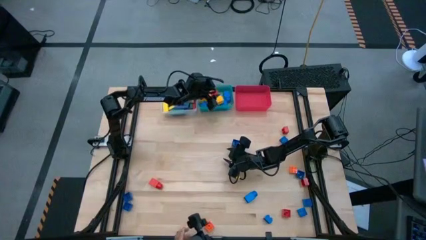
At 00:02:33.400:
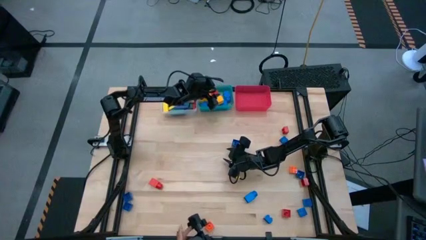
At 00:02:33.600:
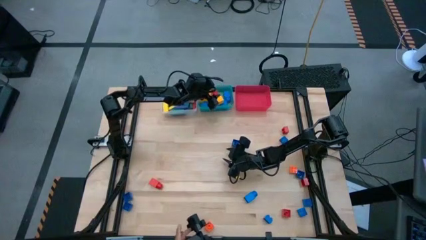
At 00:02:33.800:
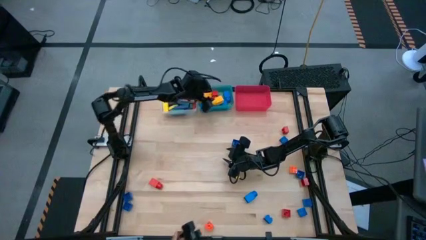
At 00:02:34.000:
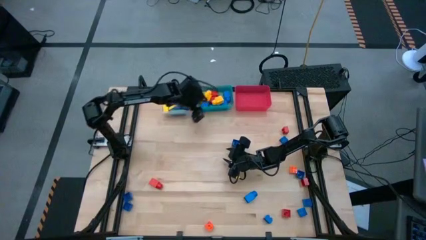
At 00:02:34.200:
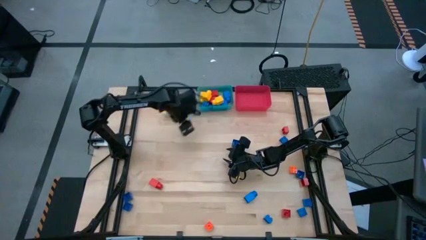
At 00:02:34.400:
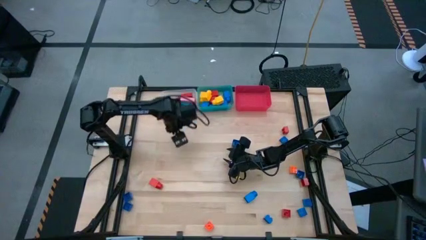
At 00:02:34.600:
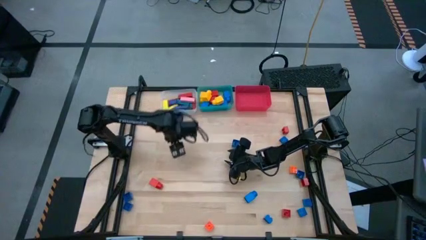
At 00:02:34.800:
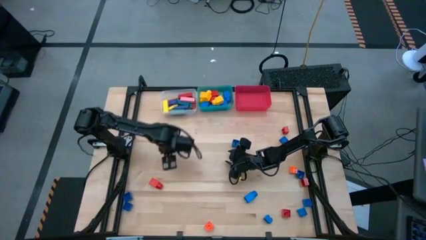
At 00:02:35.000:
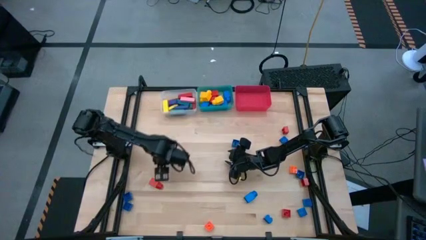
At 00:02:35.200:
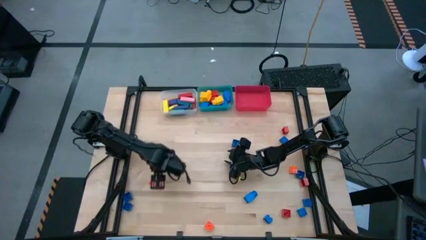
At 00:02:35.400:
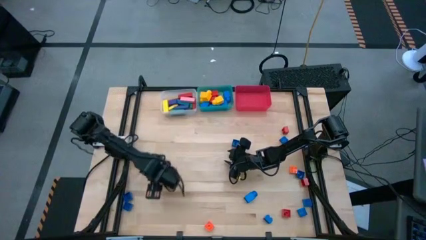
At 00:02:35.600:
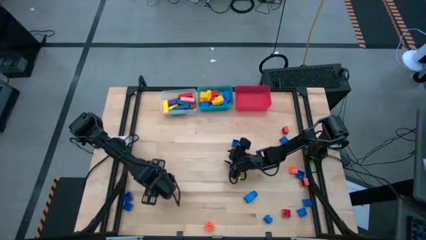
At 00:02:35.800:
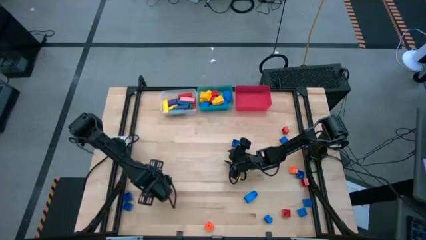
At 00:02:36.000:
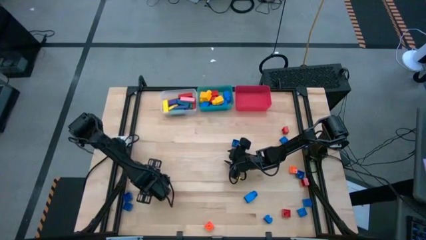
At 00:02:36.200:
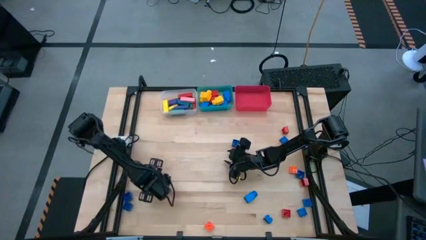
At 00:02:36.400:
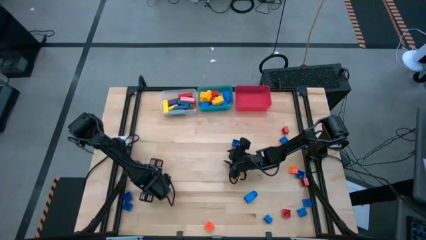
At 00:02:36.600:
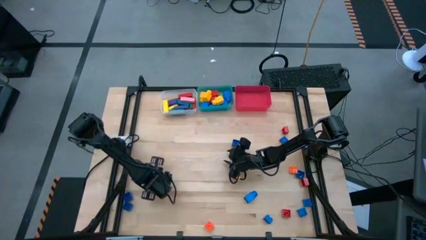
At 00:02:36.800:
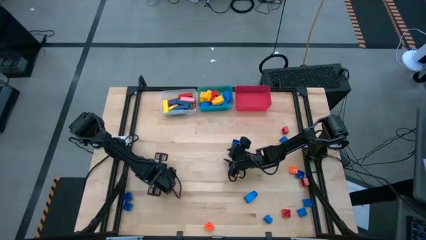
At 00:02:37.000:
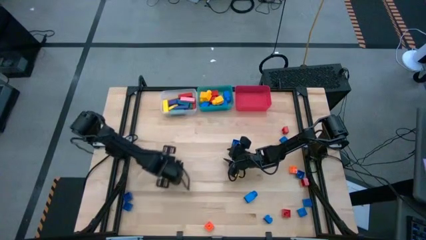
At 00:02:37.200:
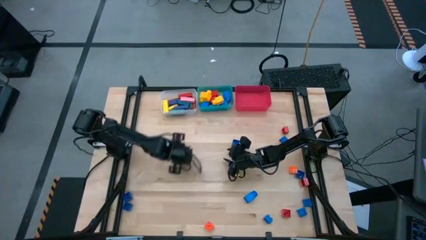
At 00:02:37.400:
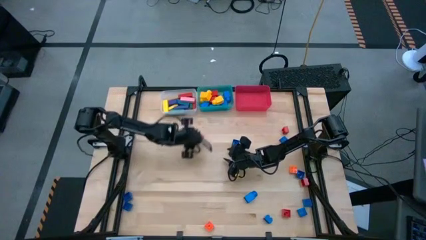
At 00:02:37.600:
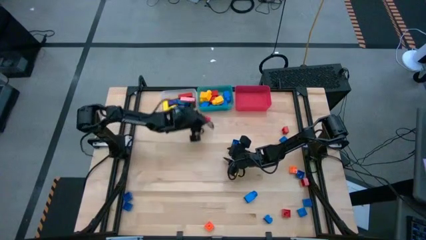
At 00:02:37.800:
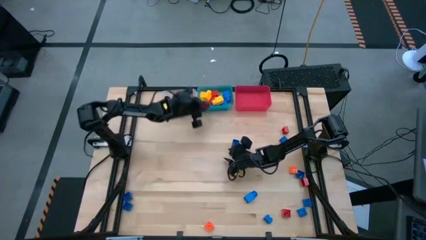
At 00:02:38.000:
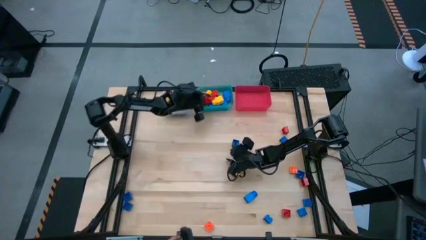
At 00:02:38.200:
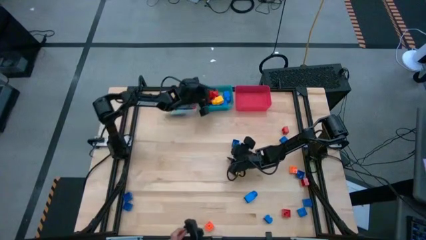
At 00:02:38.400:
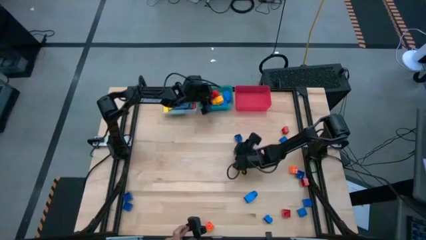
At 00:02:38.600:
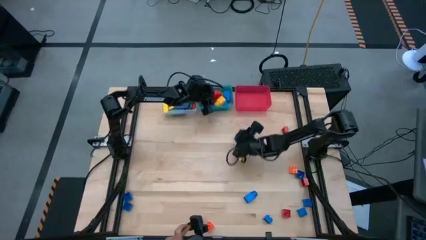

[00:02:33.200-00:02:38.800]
Task: Sort blocks by size
Put the red 1 stud game piece into the green bin

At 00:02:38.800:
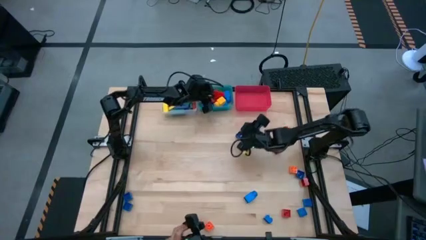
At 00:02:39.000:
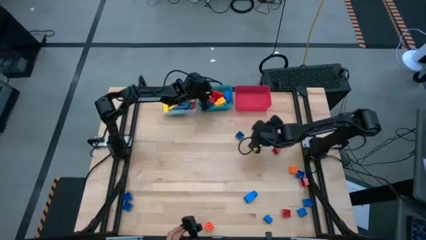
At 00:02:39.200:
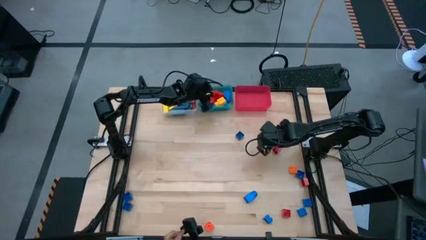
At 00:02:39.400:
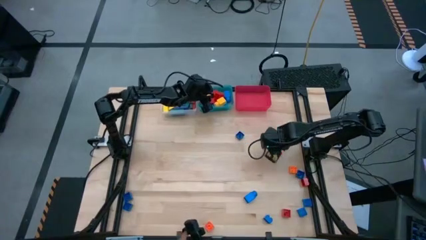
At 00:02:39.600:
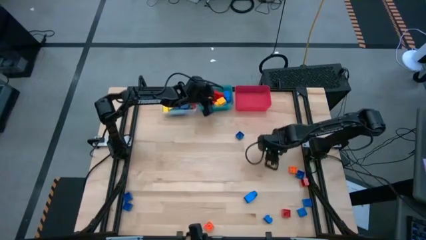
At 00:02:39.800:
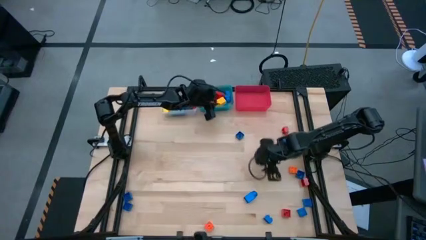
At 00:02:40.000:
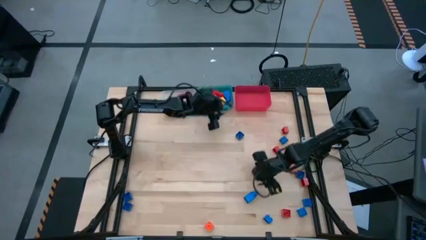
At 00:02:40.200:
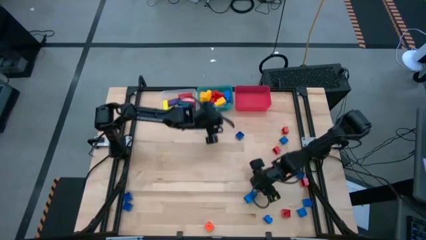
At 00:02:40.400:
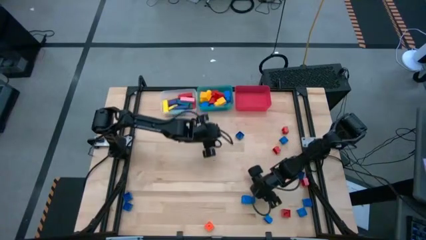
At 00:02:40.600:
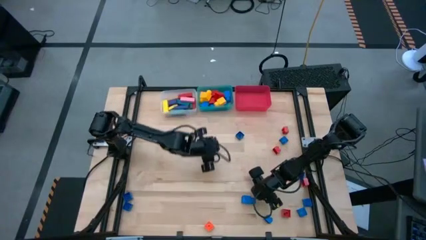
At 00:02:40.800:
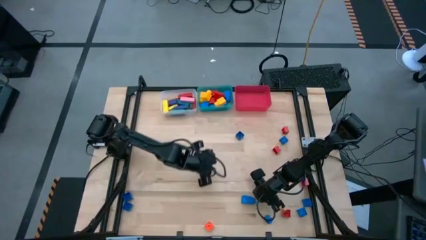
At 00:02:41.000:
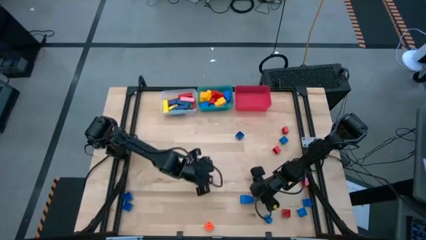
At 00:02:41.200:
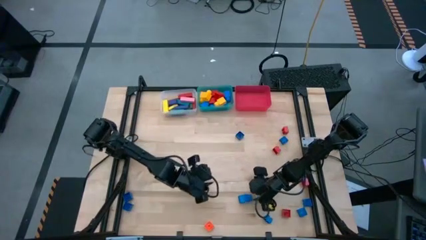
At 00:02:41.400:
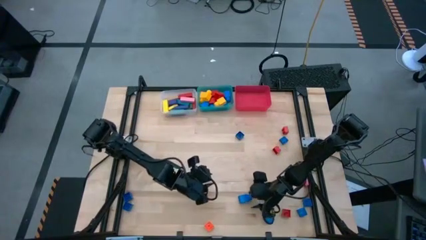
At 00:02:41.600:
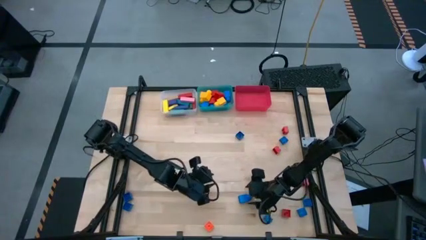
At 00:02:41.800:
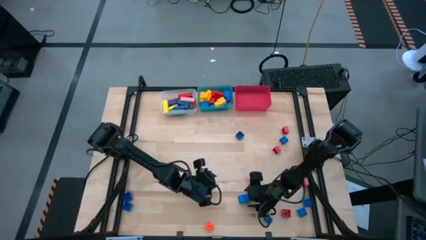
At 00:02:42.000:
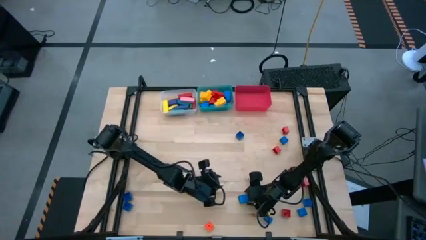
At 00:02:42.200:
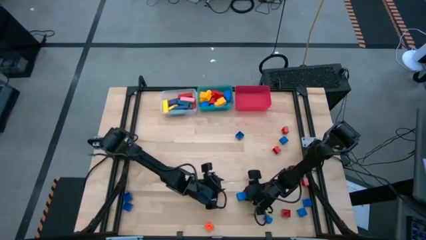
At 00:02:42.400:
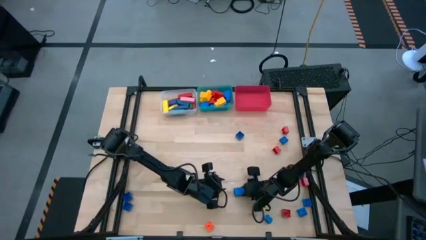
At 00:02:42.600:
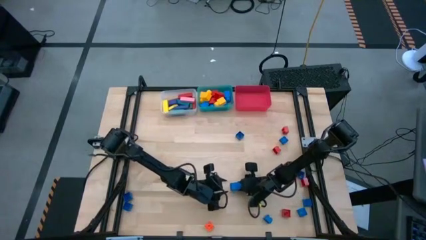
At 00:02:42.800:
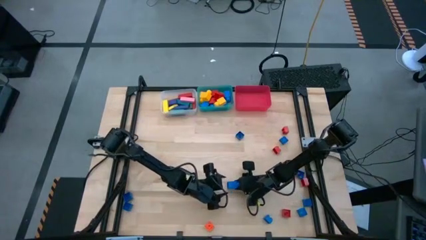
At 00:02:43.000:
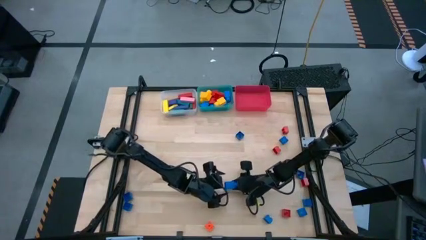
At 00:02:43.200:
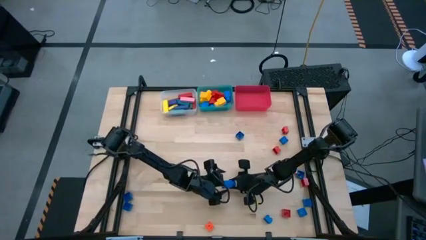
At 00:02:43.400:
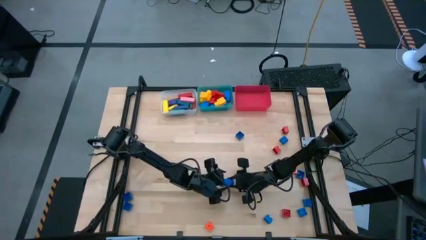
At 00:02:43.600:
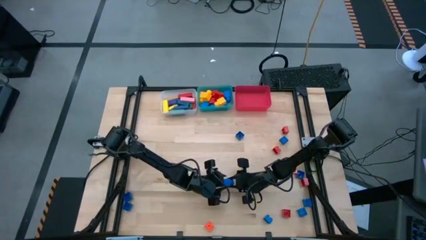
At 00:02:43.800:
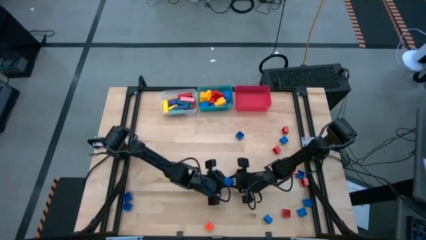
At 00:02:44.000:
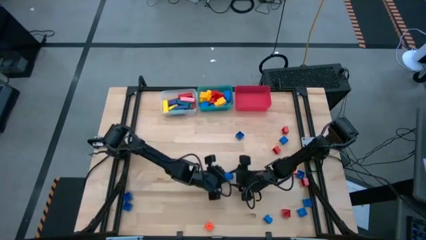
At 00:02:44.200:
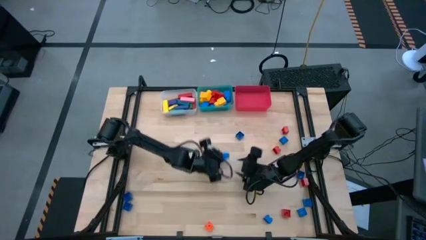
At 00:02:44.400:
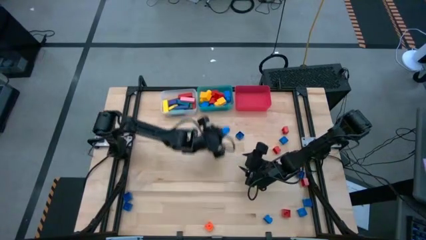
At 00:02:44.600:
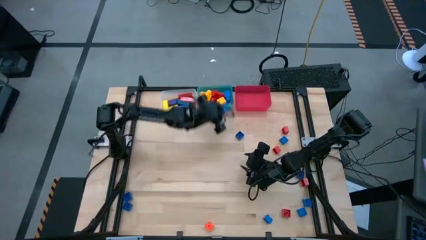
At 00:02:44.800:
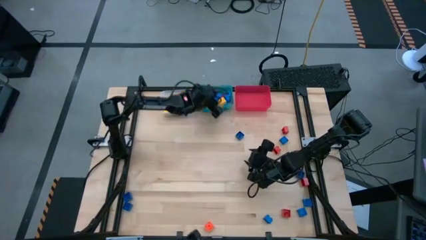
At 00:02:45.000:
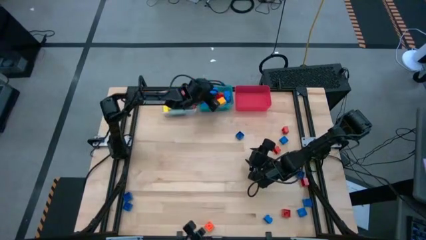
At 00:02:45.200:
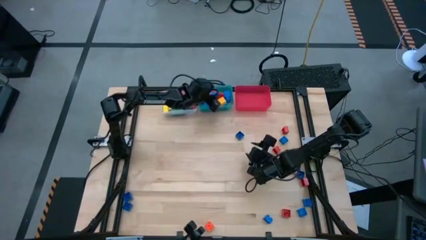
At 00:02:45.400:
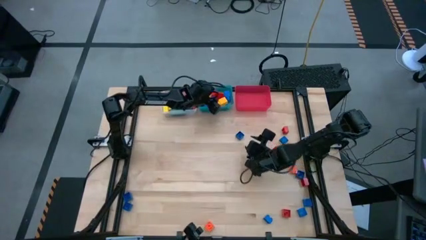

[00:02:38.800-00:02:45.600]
Put the blue 1 stud game piece into the green bin

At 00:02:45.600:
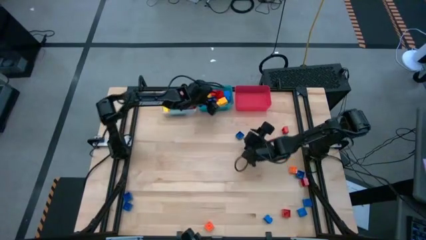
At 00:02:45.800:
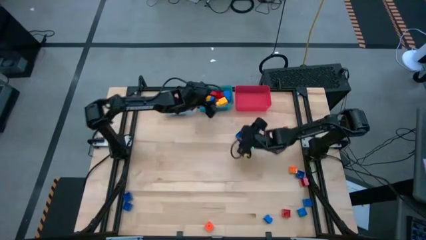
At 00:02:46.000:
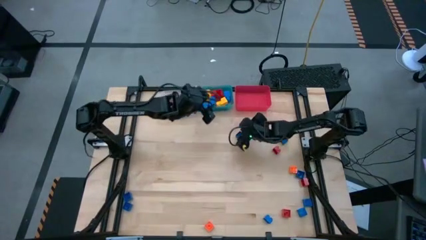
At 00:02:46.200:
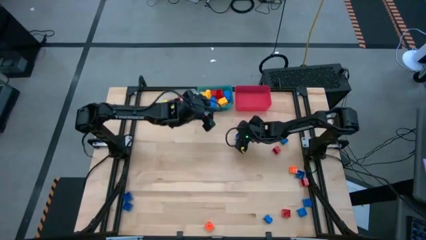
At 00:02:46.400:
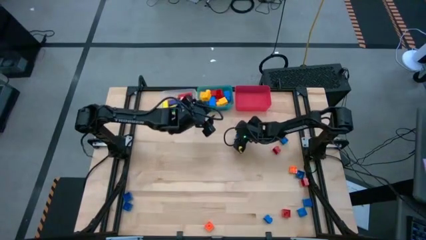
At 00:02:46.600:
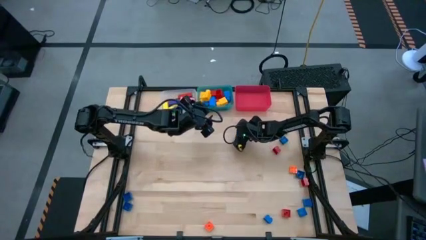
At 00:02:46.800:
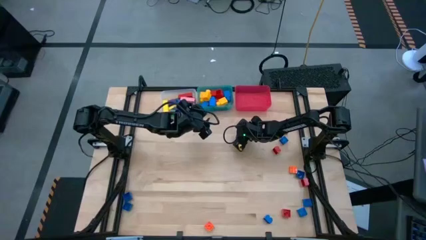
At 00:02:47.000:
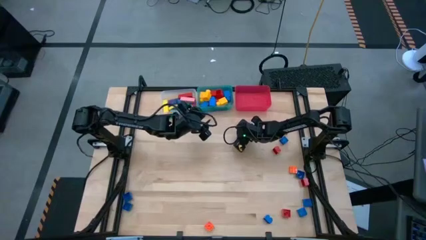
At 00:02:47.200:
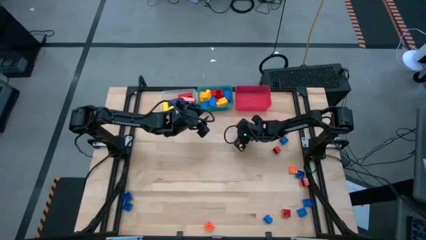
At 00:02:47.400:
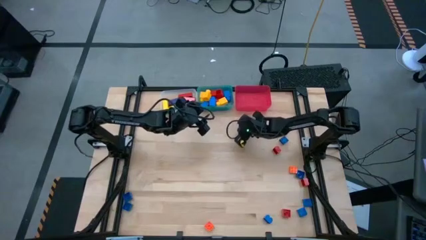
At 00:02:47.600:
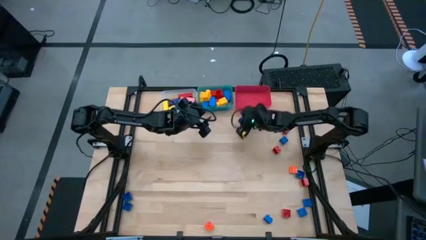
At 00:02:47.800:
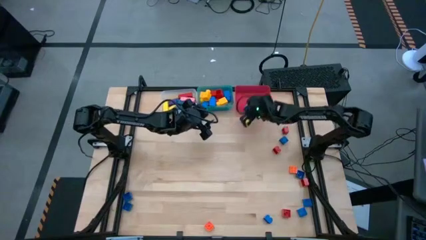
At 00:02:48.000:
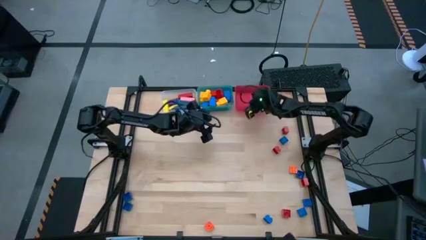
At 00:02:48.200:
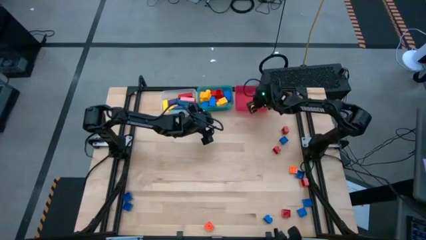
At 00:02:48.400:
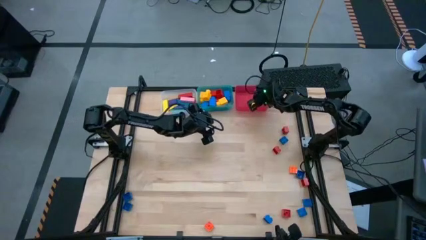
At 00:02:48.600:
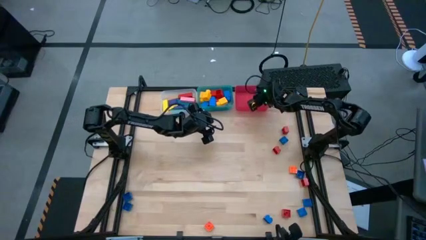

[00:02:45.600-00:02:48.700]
Put the blue 4 stud game piece into the red bin

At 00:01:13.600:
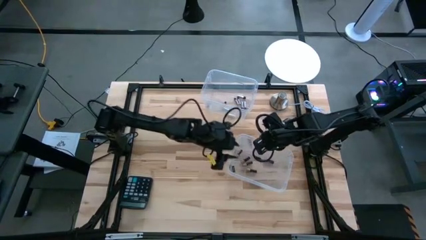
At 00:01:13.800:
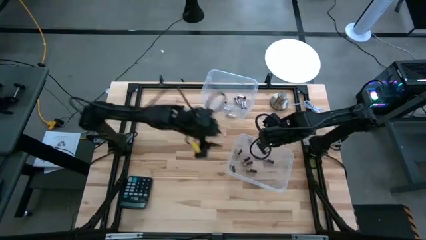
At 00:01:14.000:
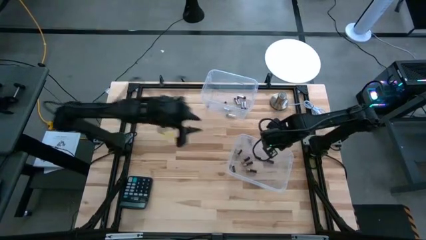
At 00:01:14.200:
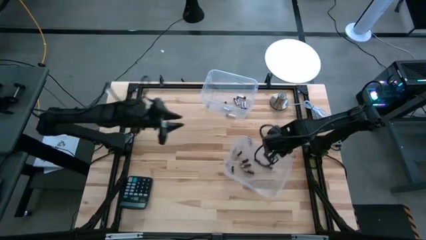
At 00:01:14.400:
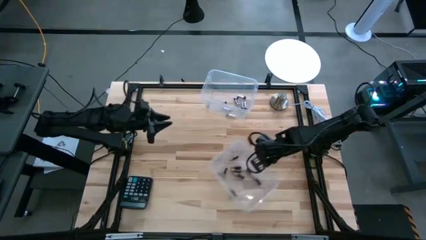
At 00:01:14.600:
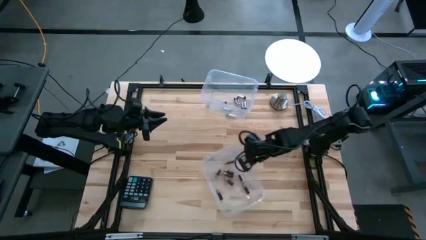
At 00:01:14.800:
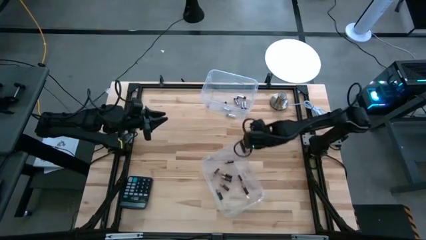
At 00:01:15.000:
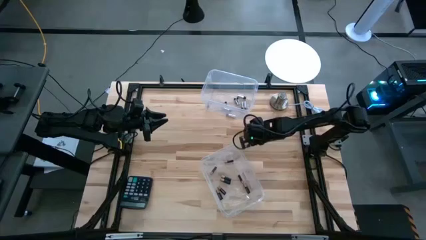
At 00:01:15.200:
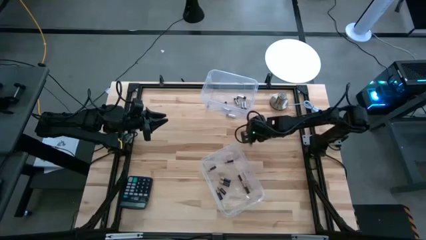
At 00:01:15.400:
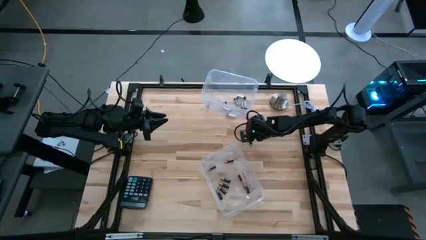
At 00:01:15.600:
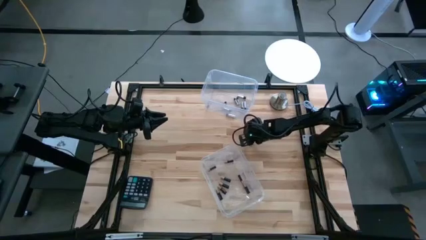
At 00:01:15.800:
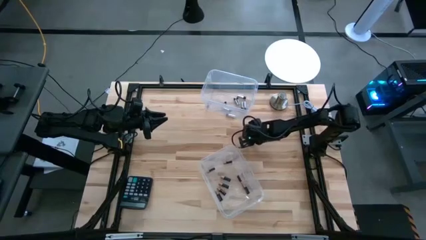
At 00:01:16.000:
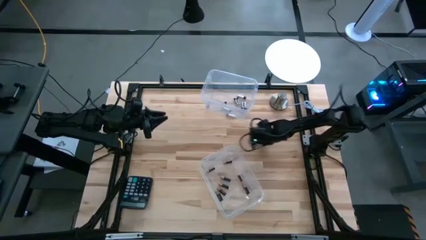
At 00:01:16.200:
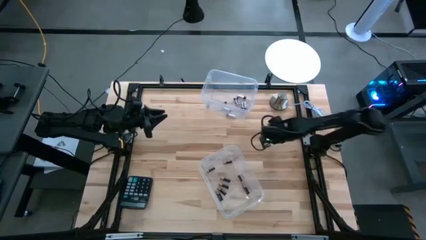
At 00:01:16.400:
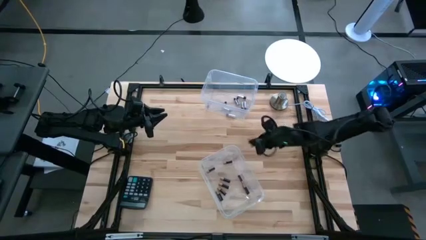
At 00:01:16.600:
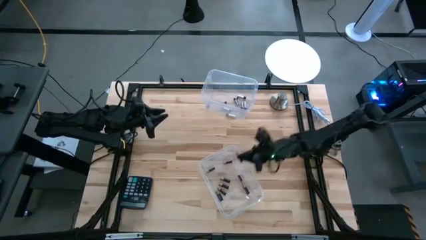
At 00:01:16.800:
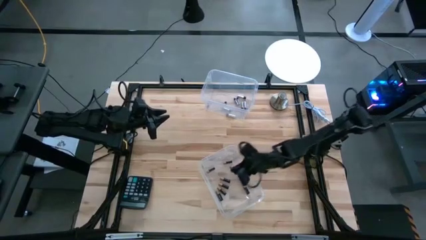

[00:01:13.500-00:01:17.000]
Task: Sort batteries
Put the black battery into the bottom transparent bin
